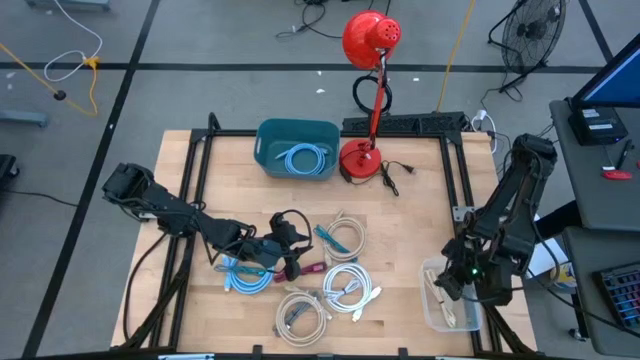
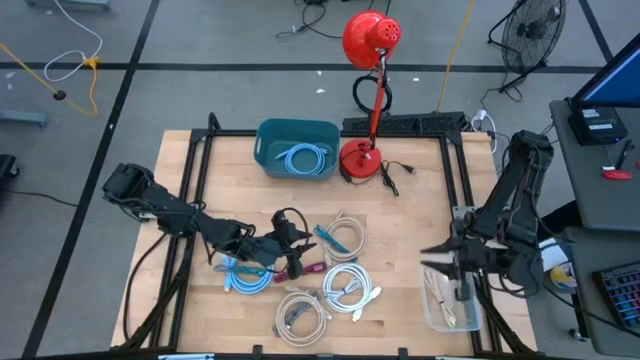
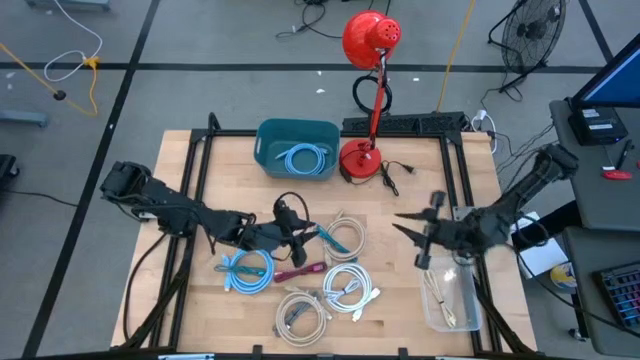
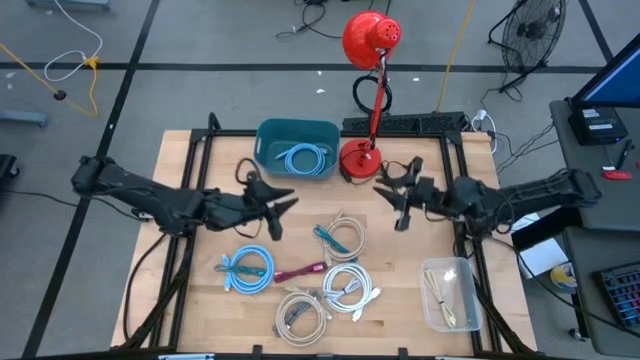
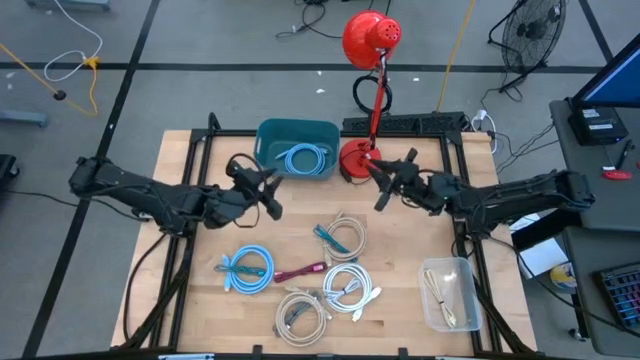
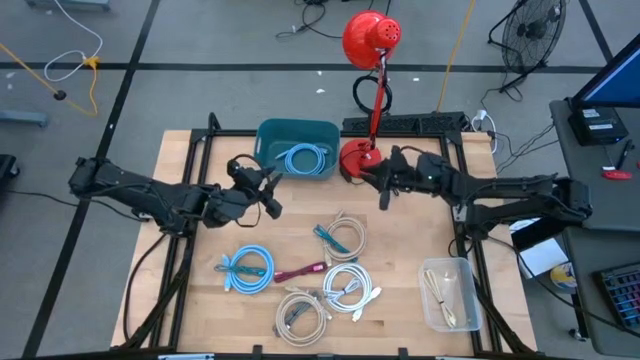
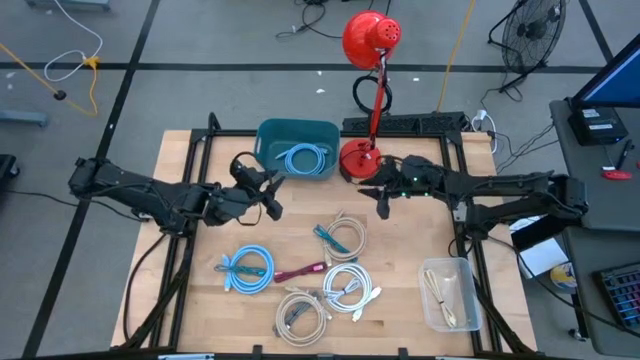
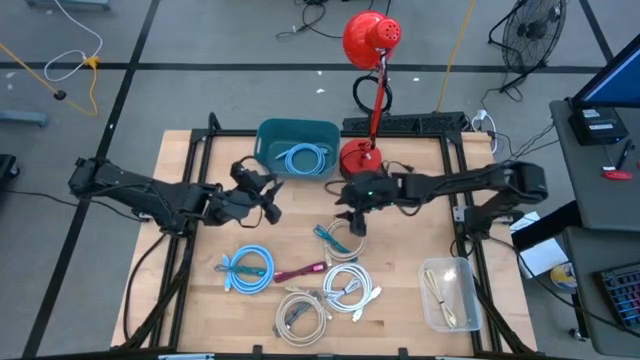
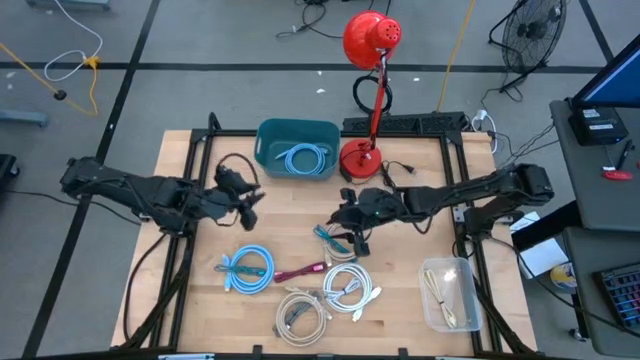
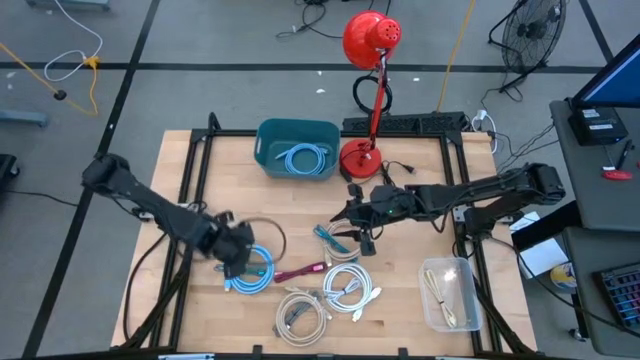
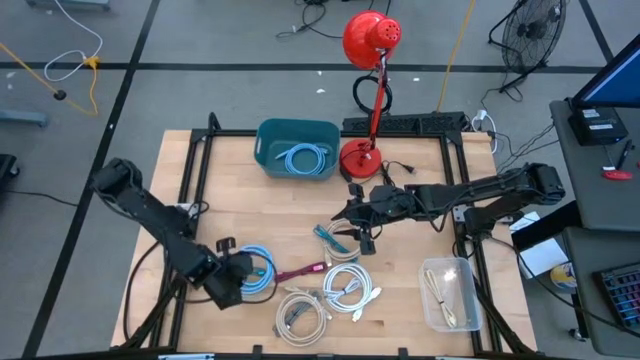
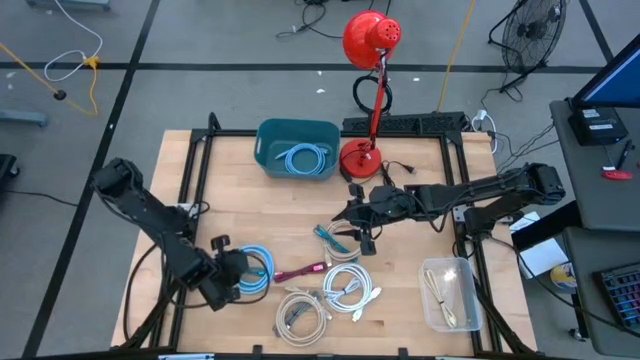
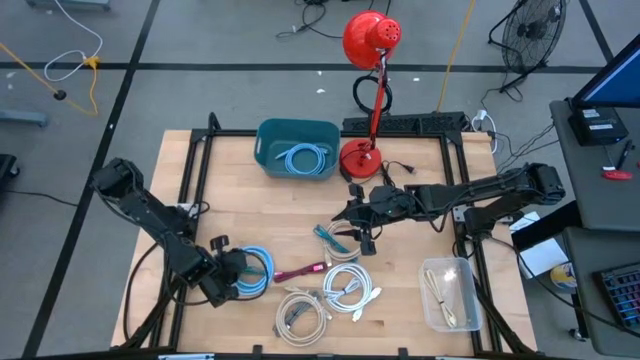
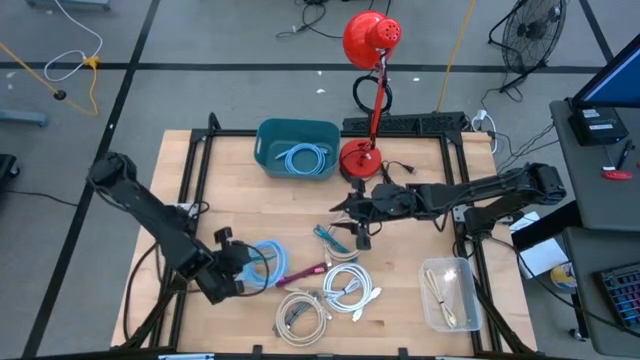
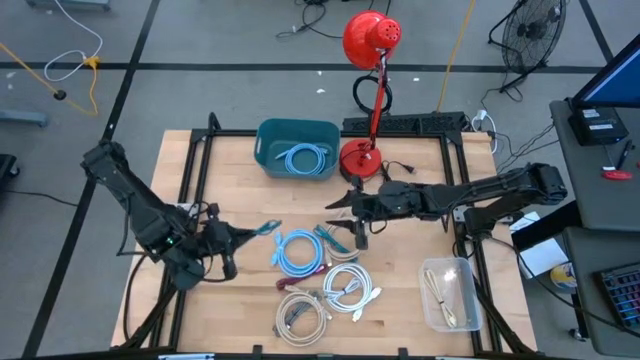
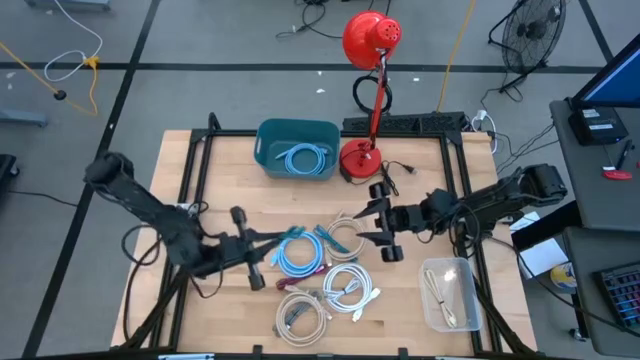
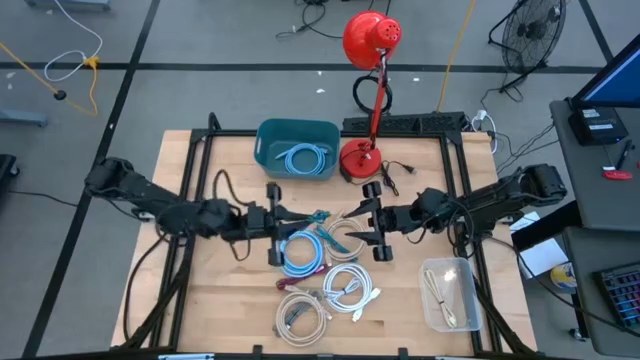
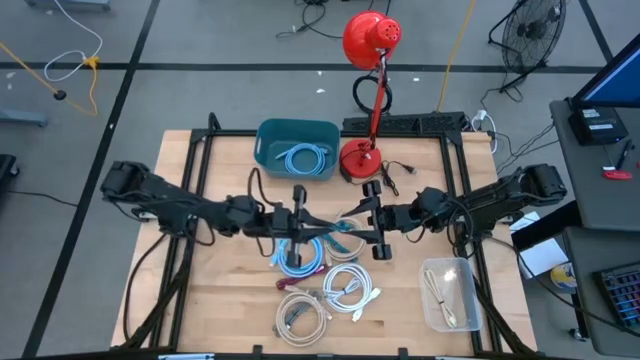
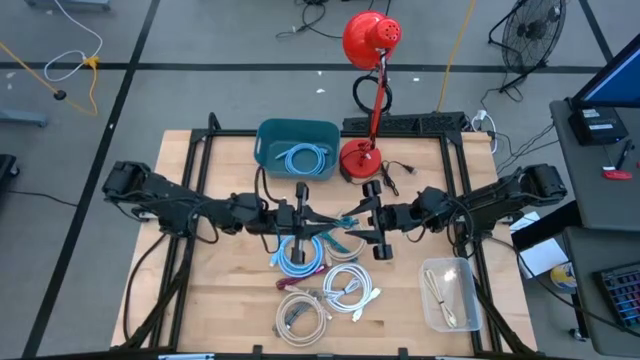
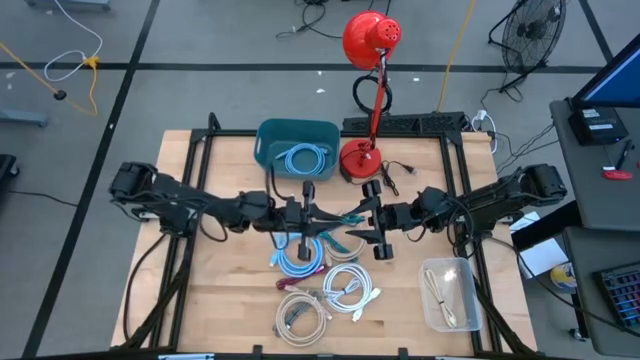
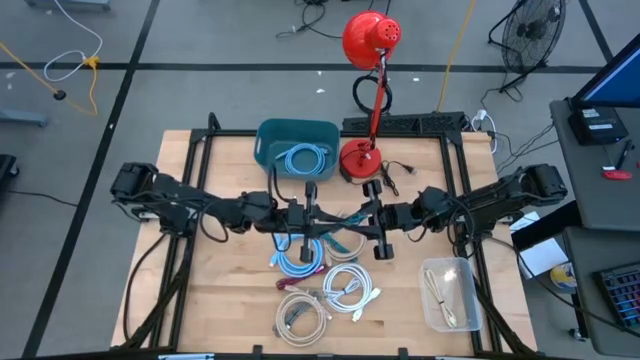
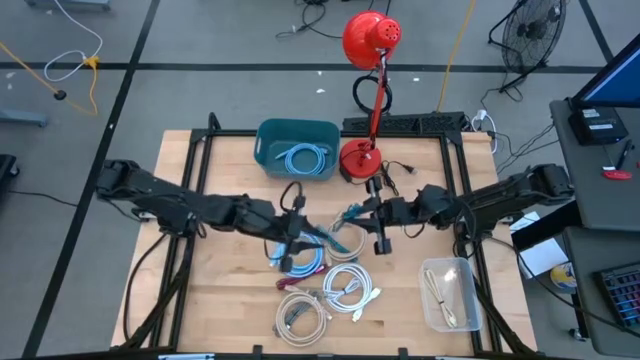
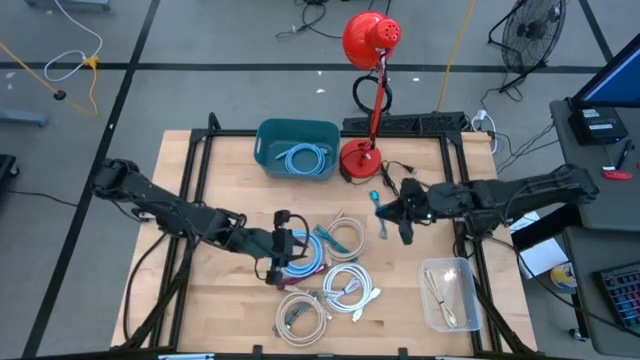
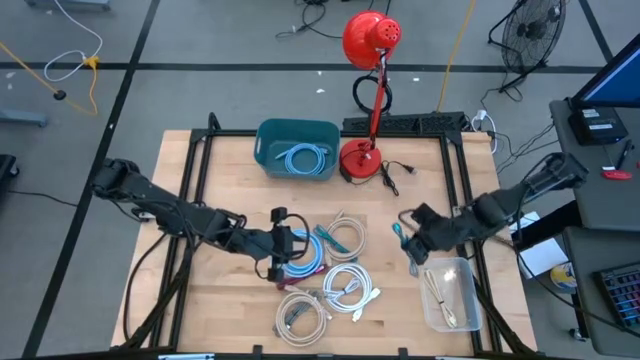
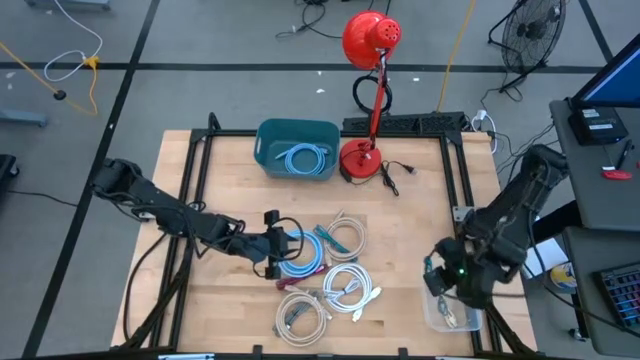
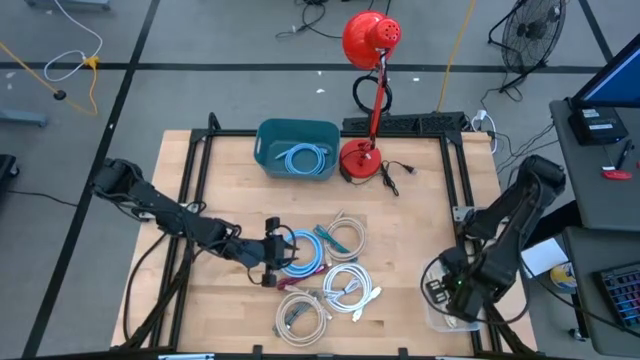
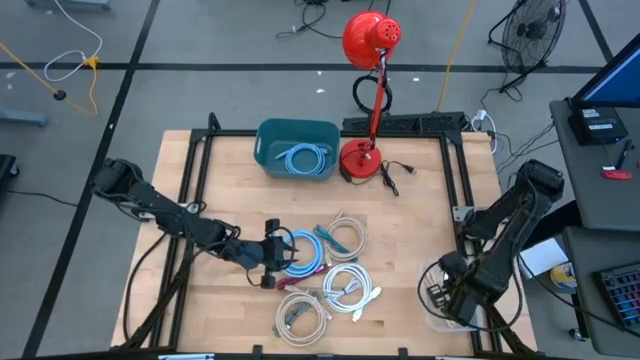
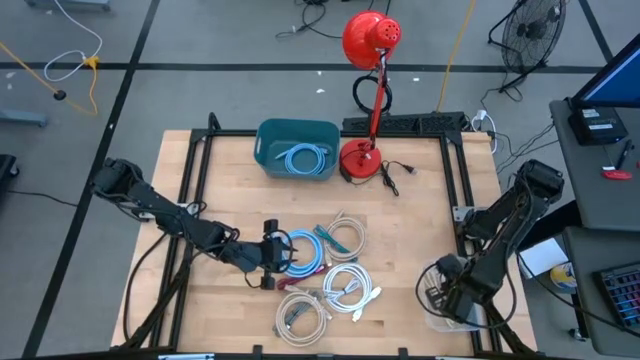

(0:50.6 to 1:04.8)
Task: Pick & Place USB Port
Put the left blue charger cable into the transparent bin

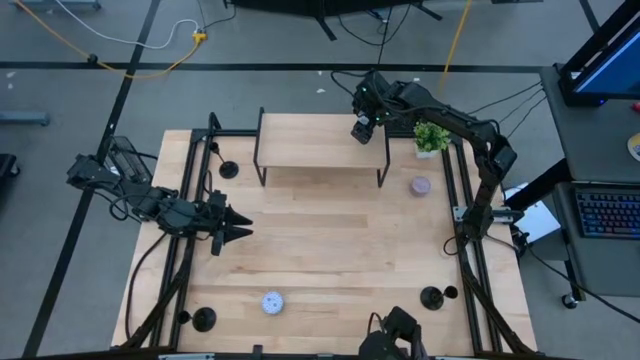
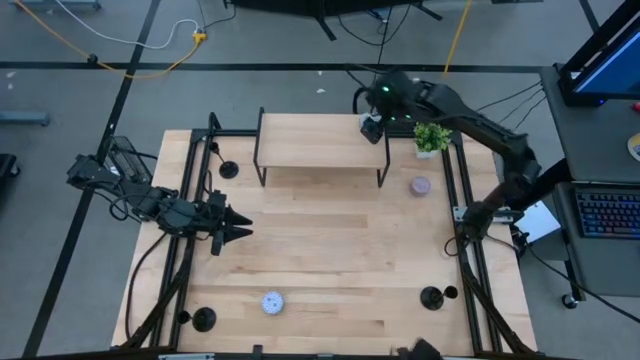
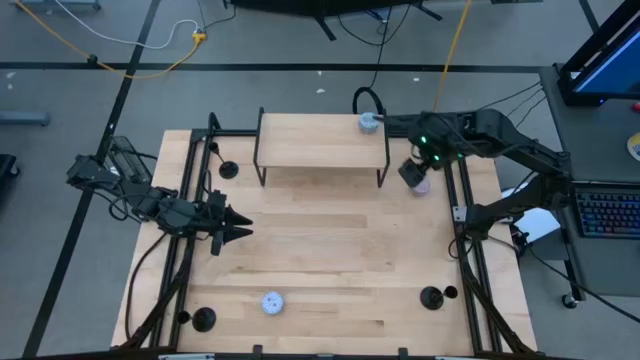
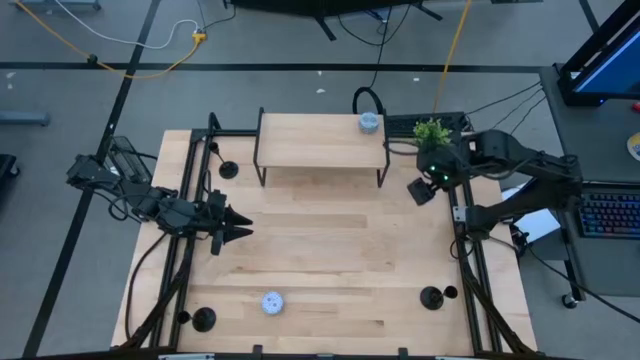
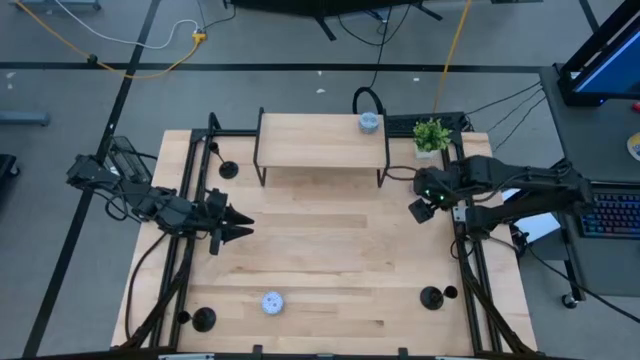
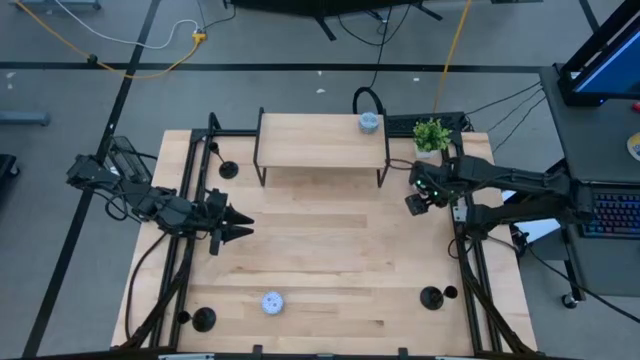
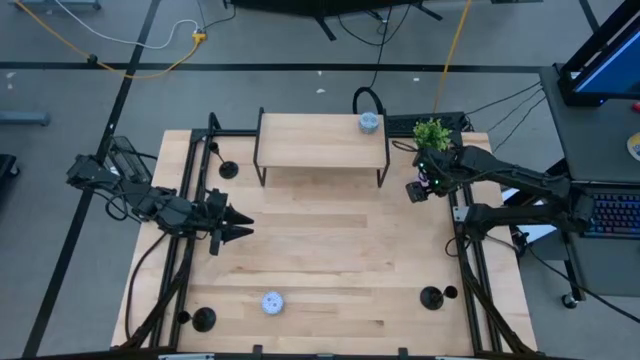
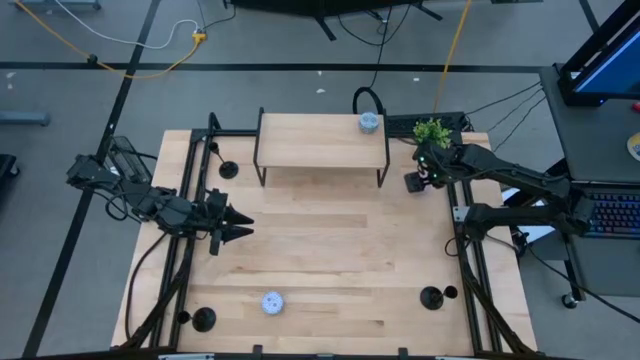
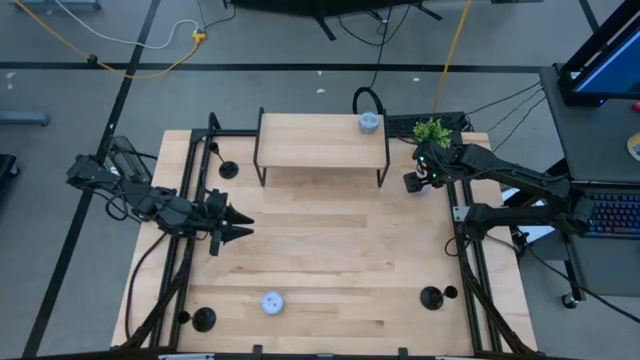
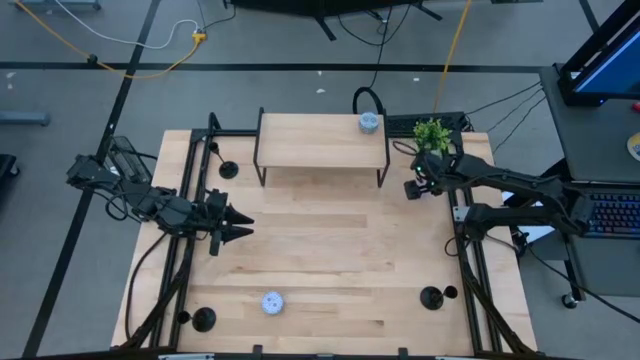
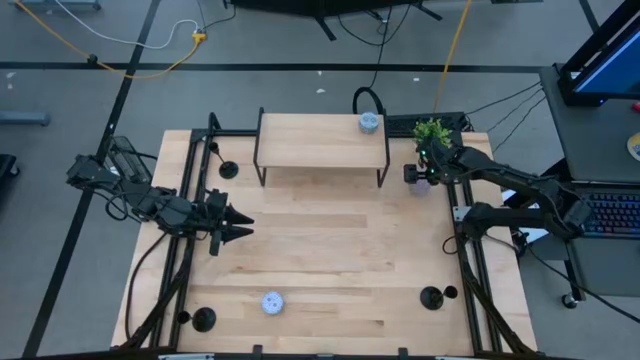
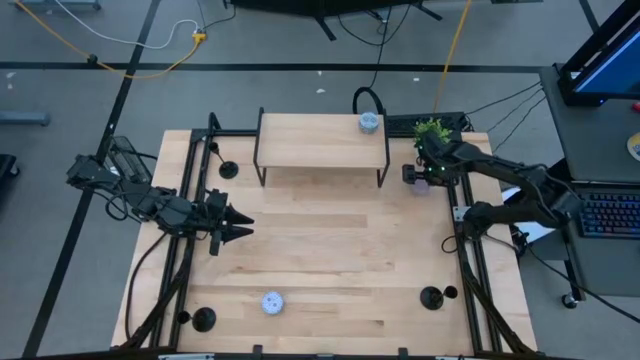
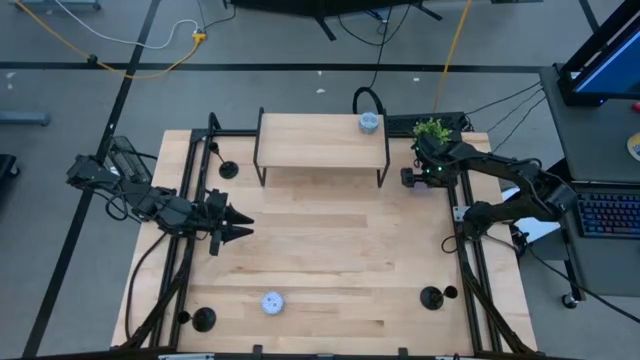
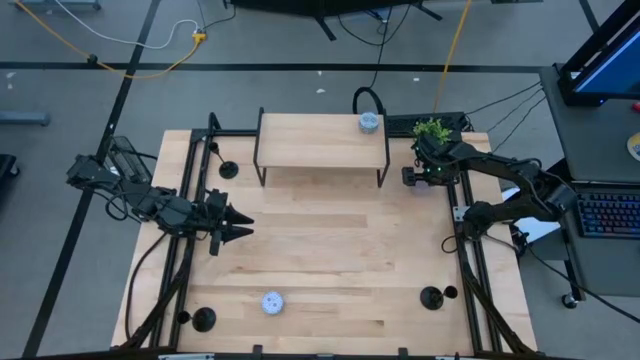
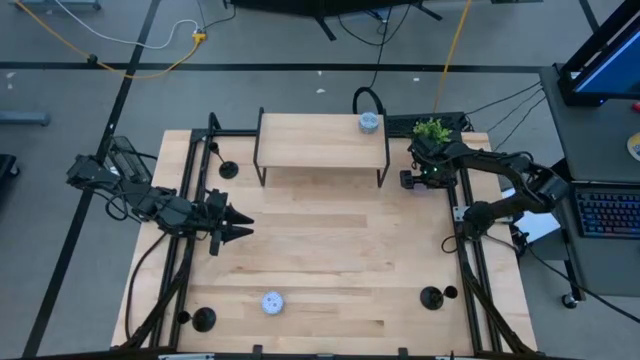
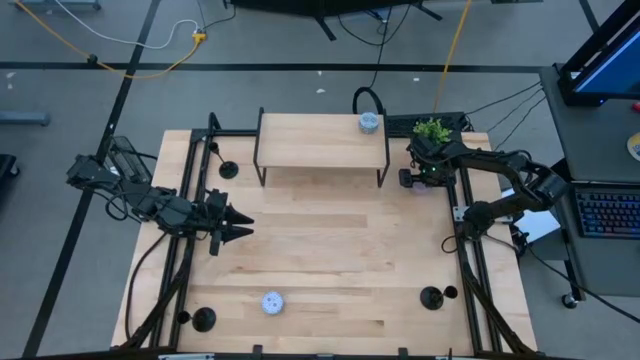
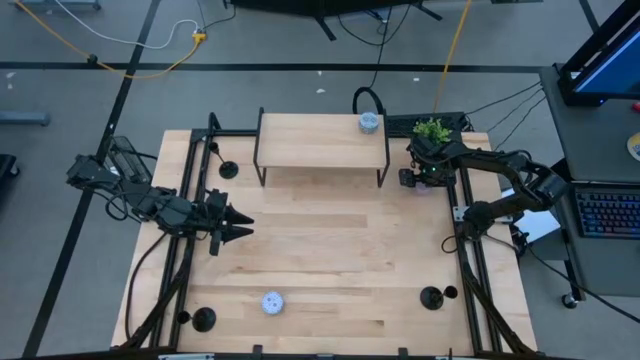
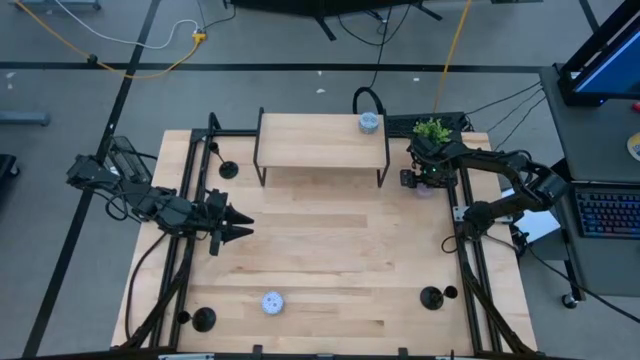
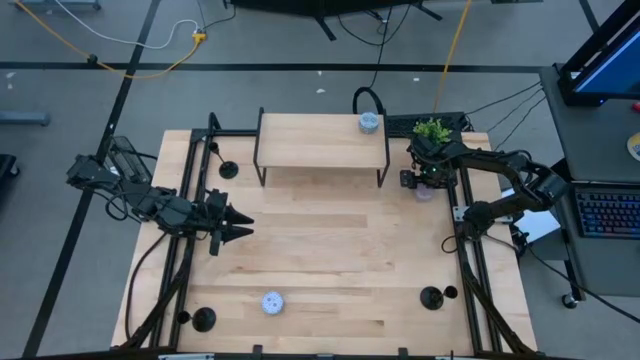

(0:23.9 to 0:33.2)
Task: Pick & Place candle stick holders
Put the purple scented candle on the shelf
